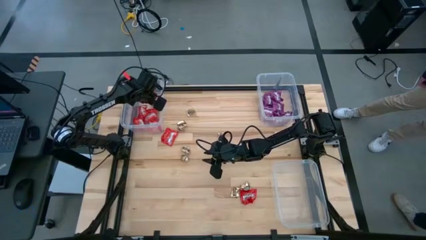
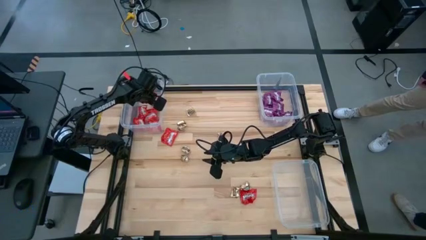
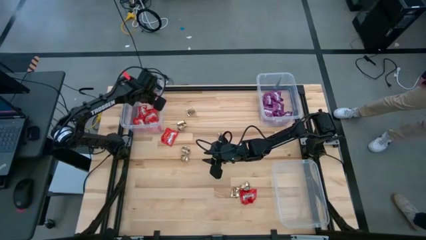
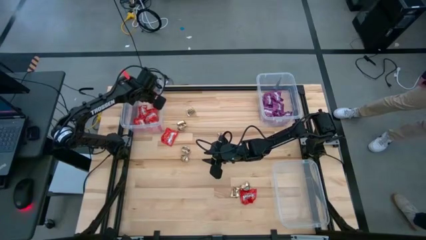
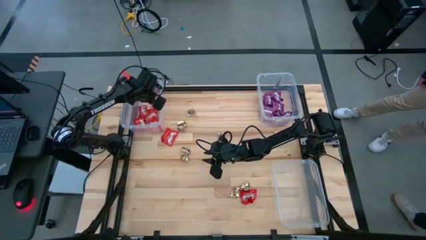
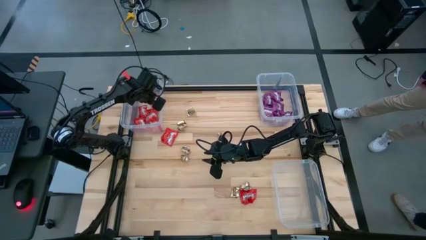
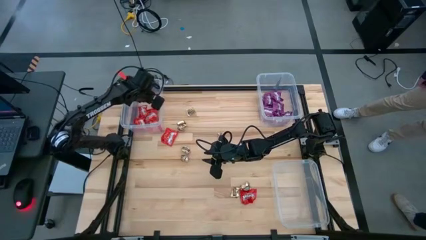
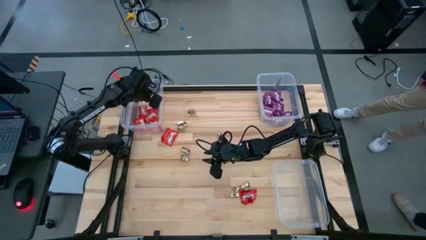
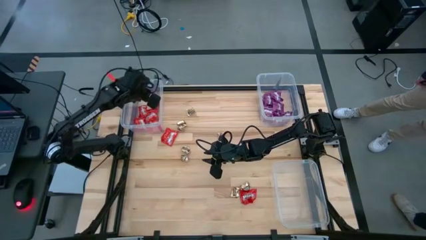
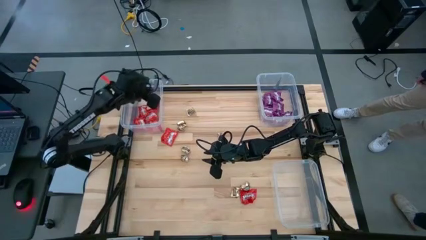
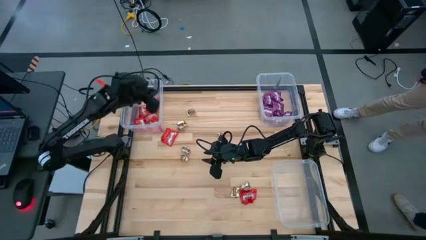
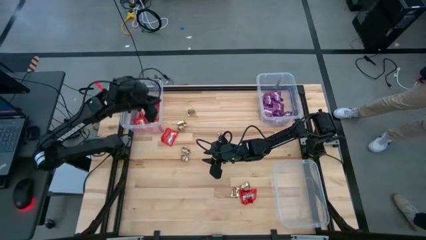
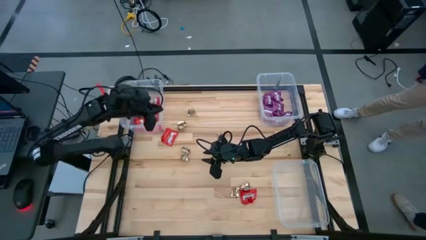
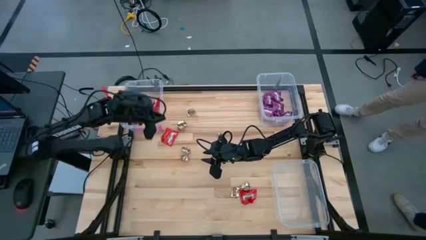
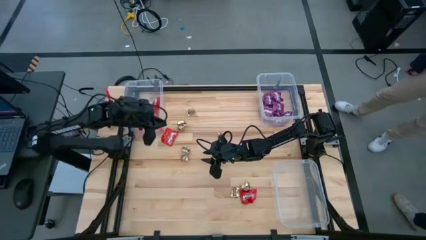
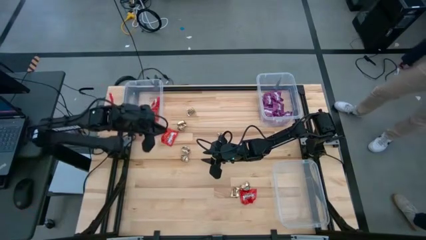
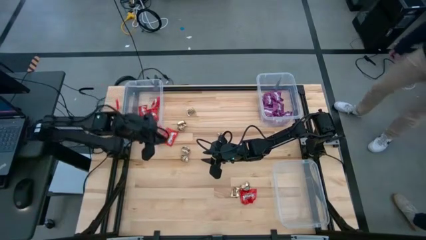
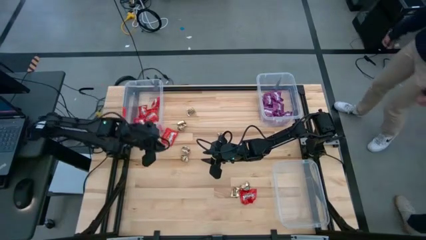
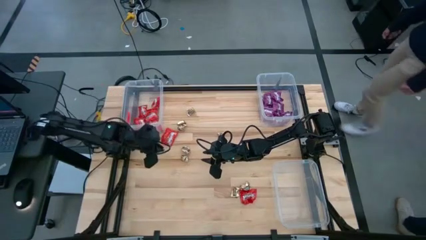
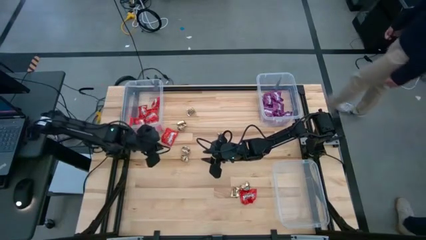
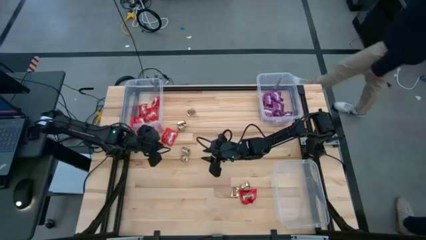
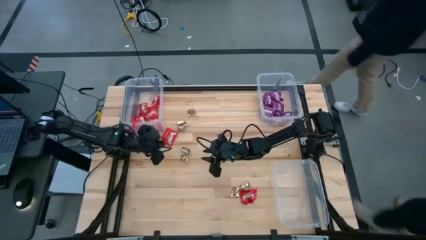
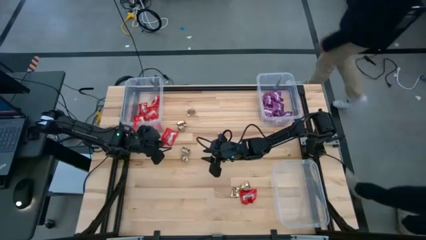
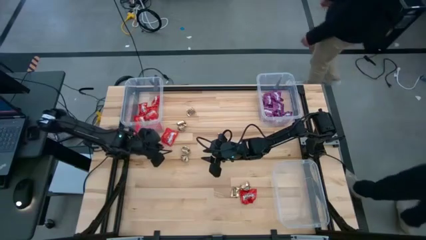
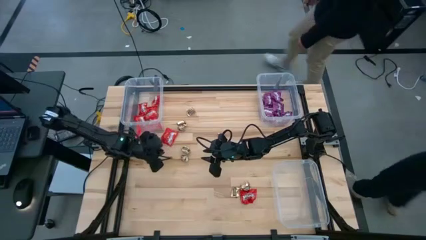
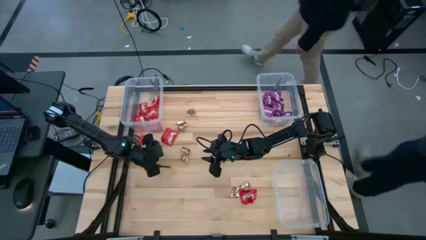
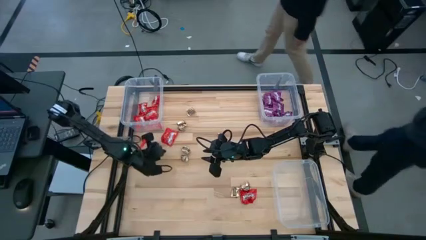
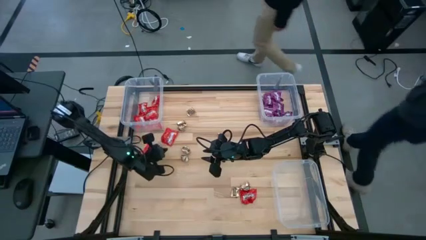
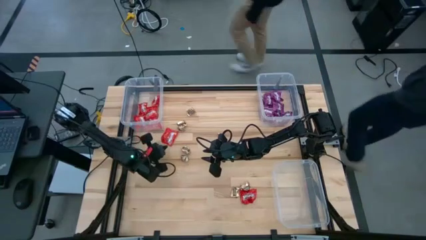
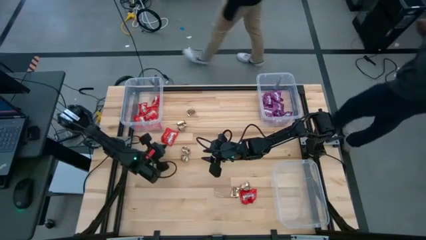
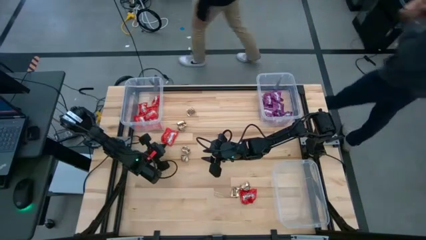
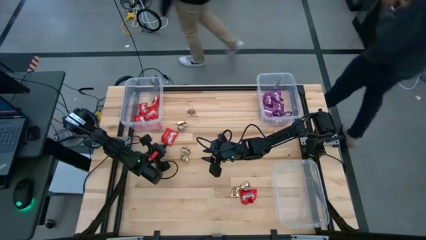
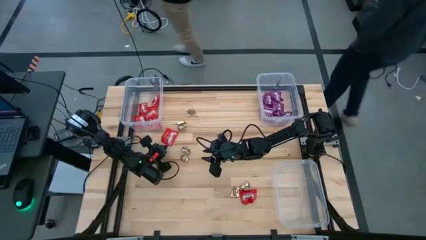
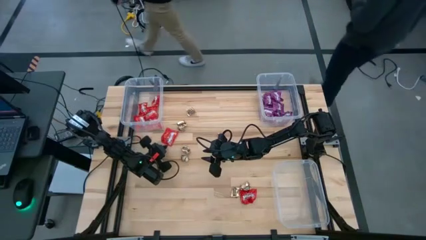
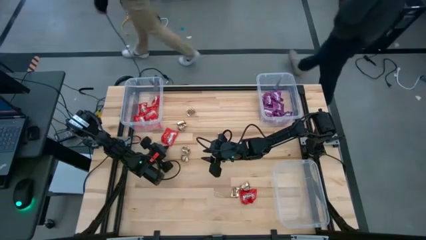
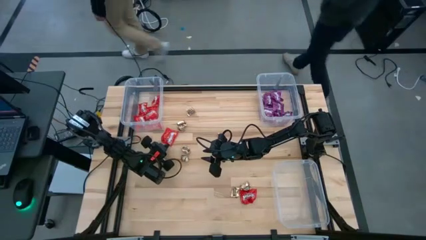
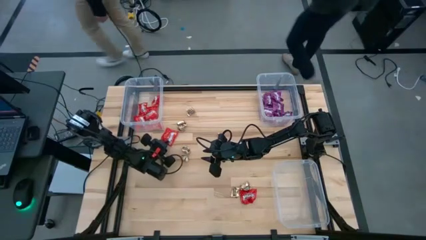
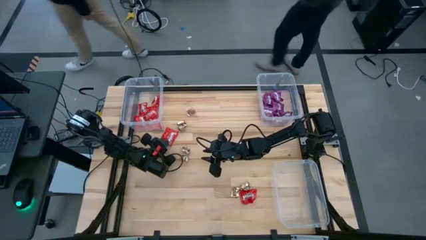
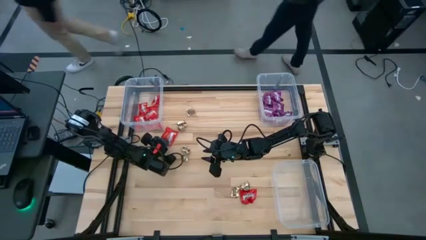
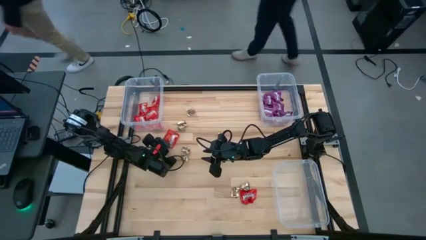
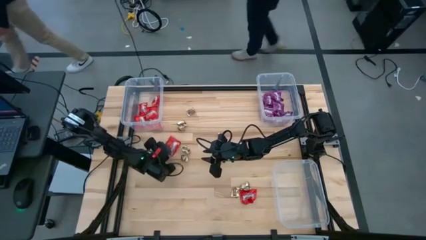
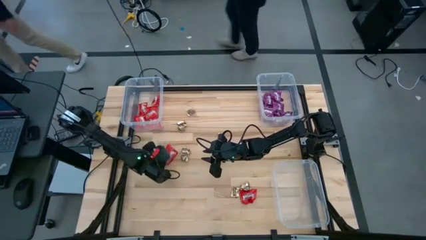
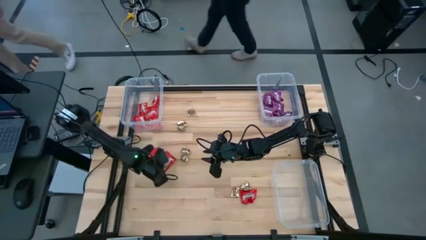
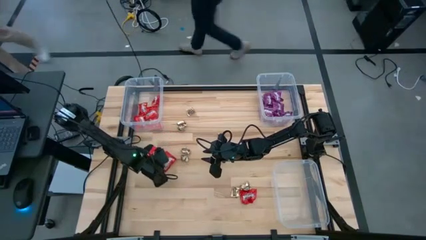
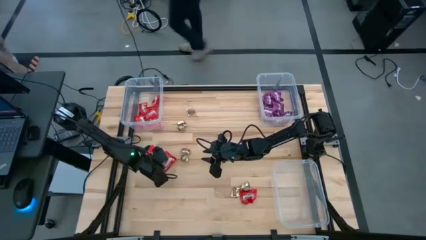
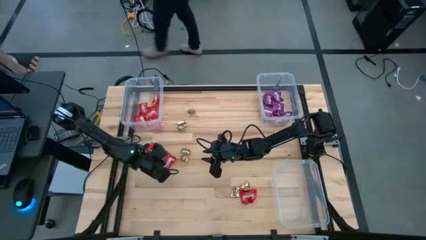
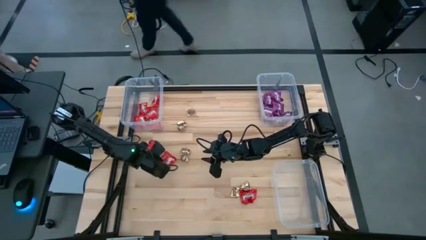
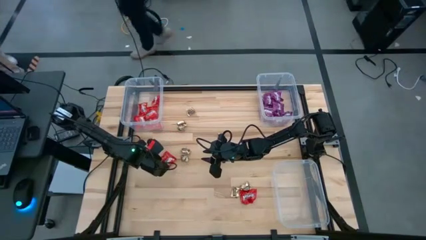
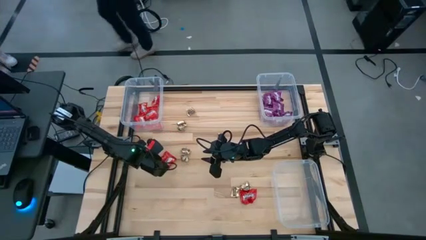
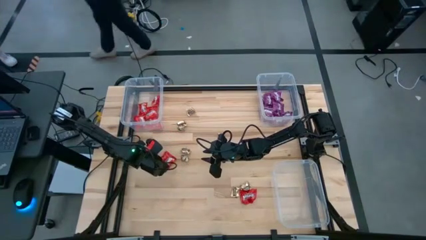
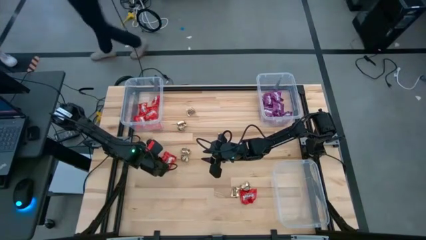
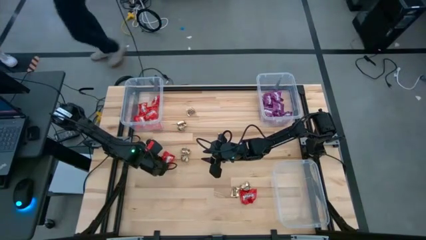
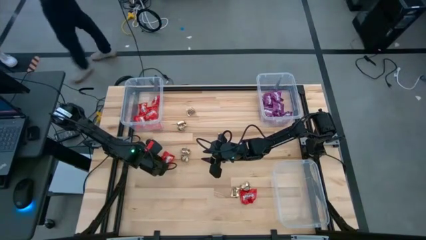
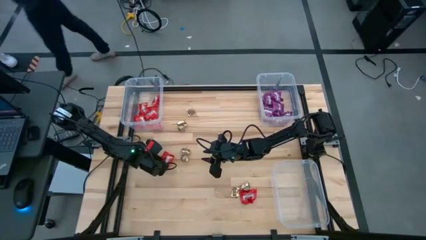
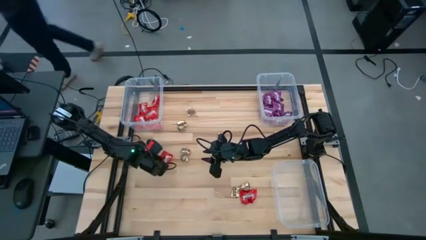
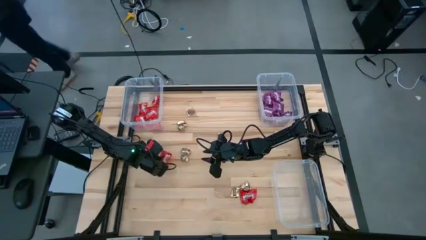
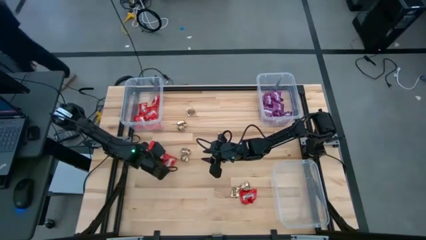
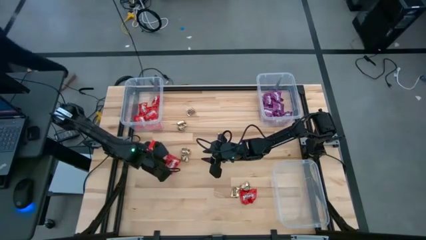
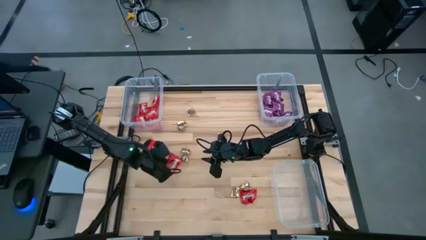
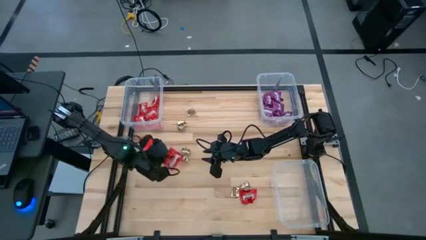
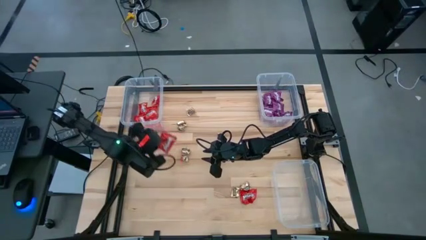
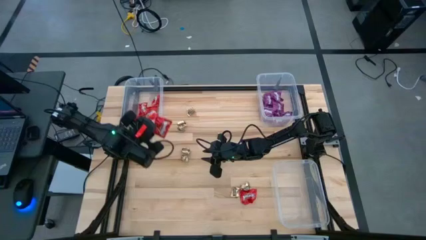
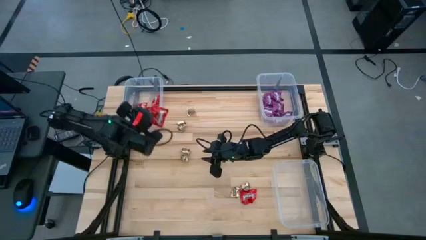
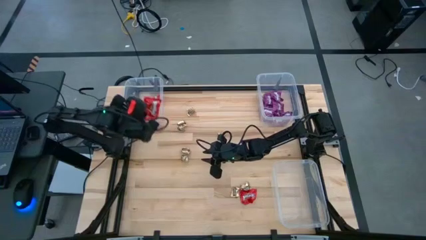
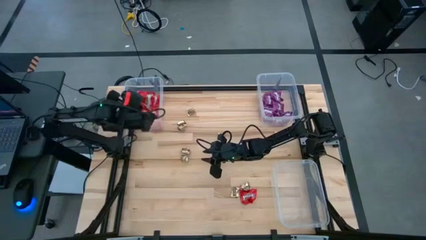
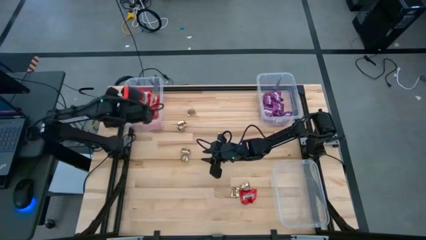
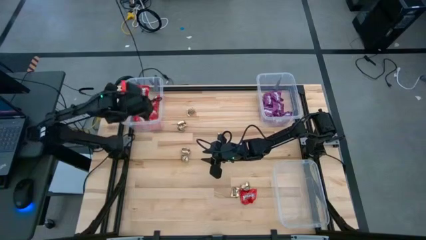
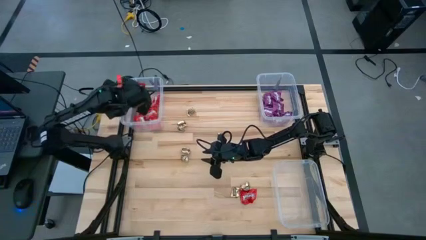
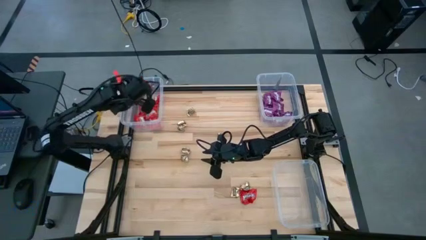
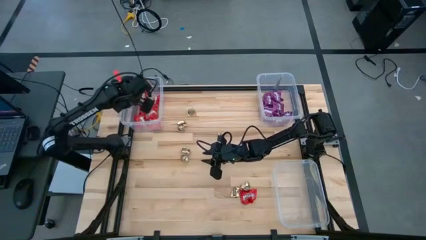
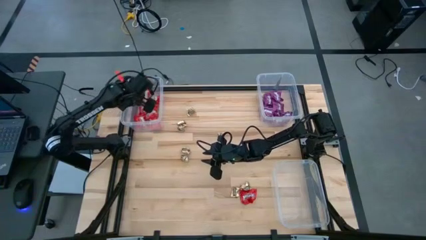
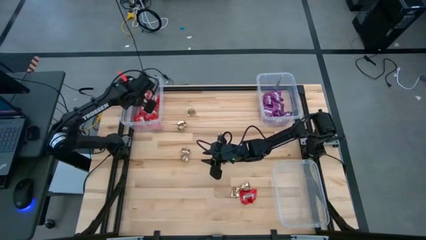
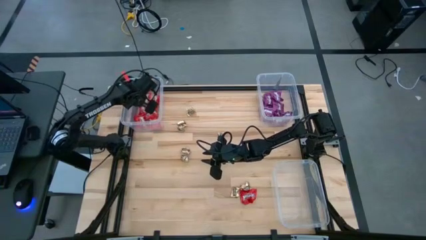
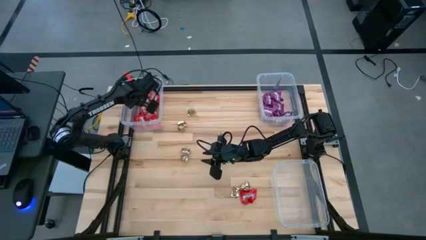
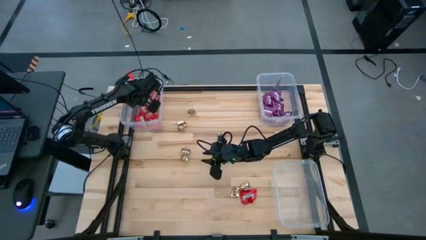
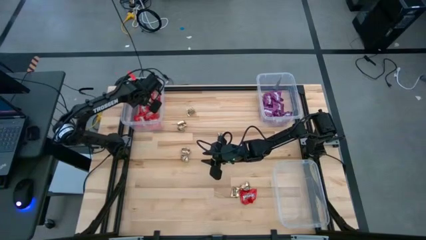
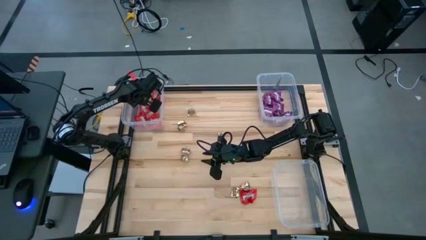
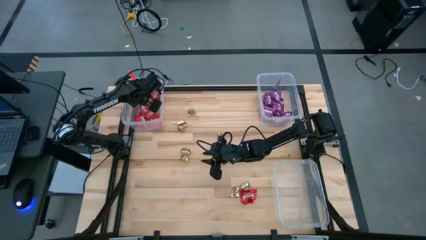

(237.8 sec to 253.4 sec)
Task: Sort candy
Put the red candy into the top left transparent bin

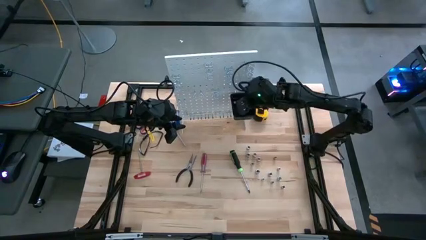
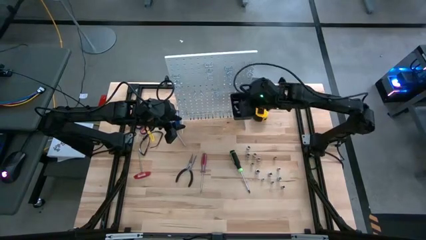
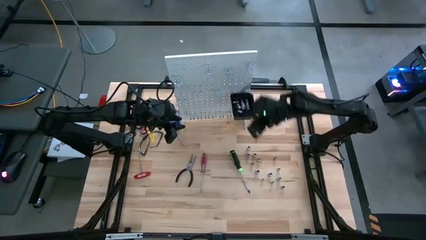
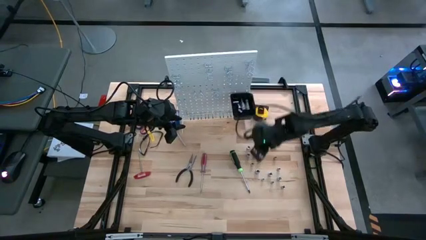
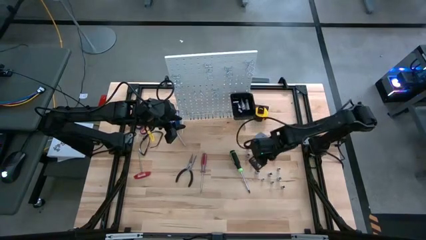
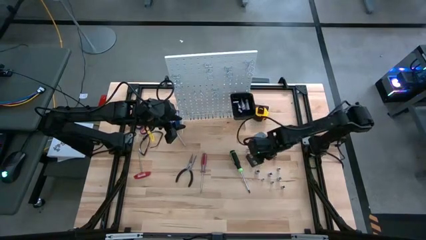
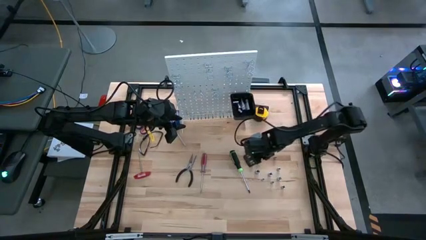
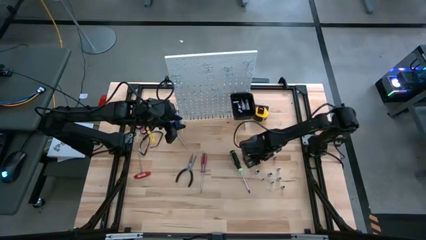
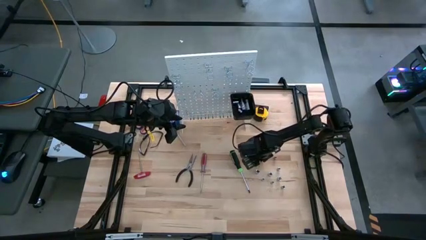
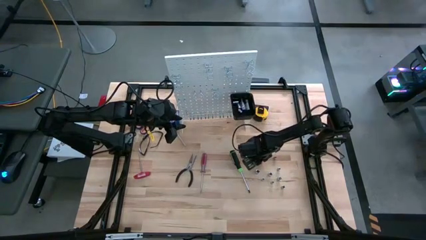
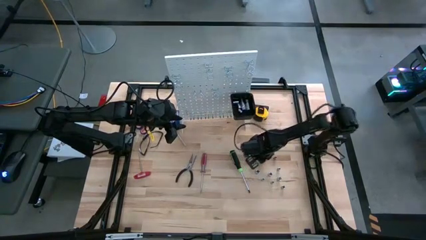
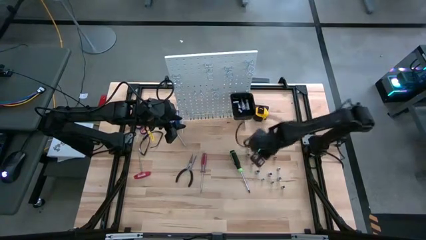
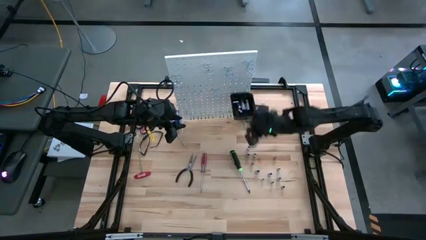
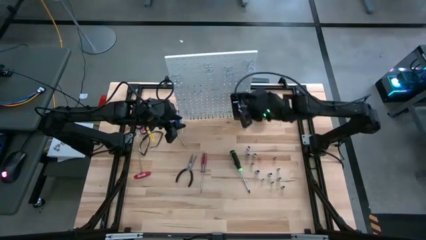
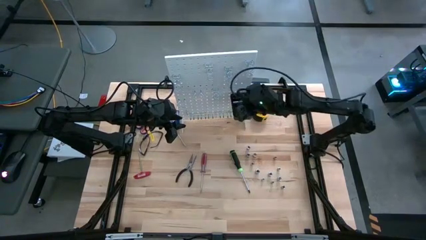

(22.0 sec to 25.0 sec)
Task: Hang tools onto peg board
Put the silver socket into the black bin on the peg board
